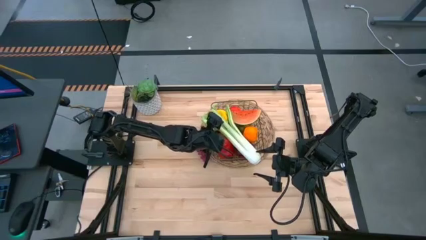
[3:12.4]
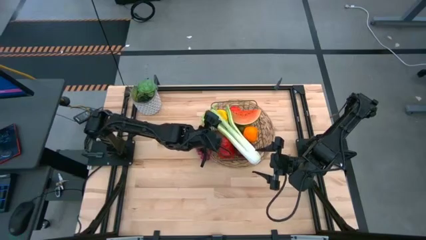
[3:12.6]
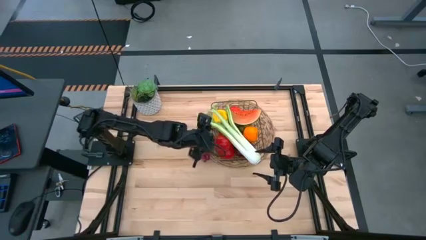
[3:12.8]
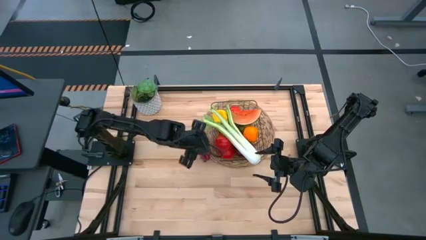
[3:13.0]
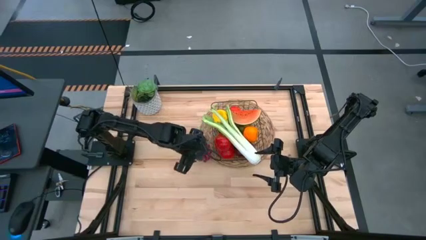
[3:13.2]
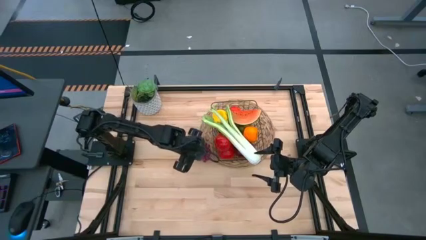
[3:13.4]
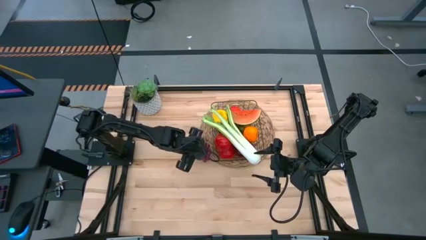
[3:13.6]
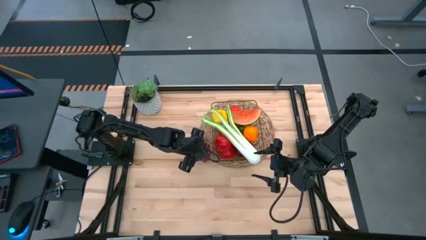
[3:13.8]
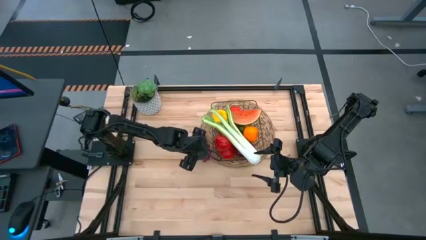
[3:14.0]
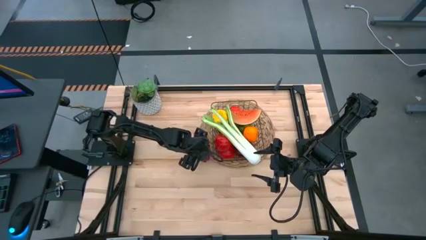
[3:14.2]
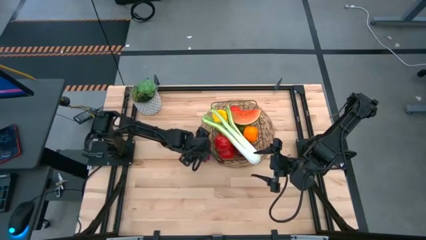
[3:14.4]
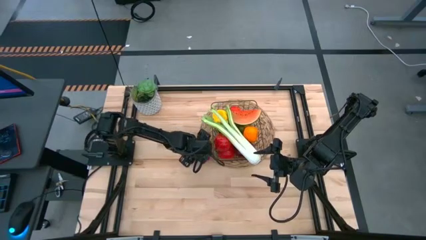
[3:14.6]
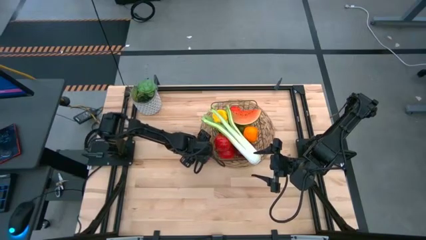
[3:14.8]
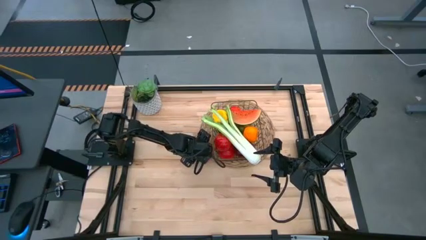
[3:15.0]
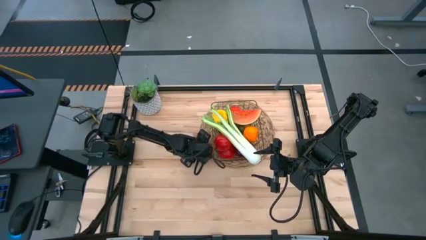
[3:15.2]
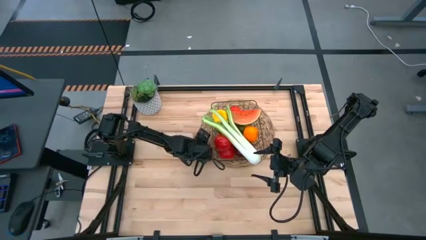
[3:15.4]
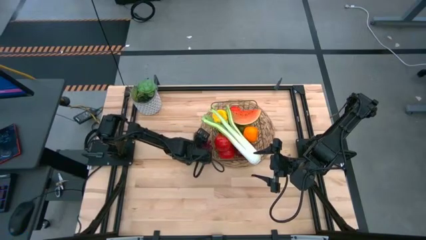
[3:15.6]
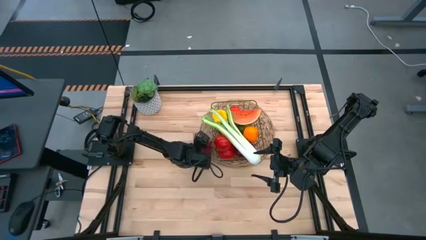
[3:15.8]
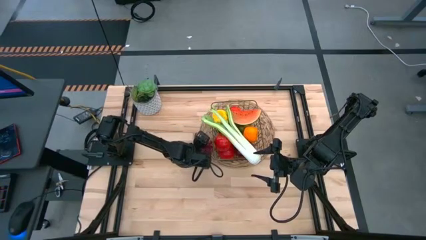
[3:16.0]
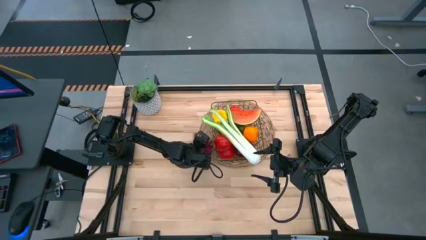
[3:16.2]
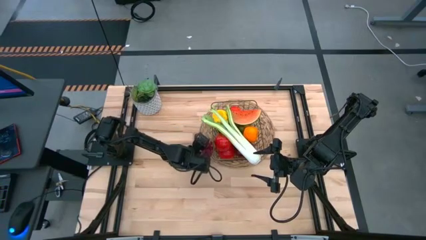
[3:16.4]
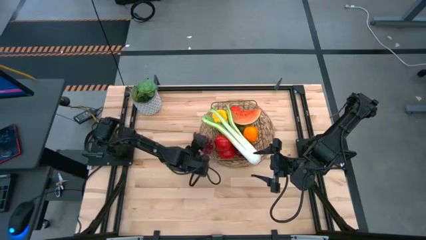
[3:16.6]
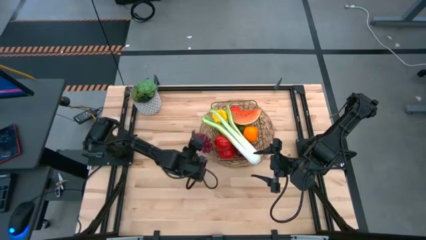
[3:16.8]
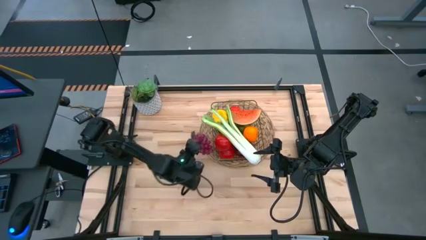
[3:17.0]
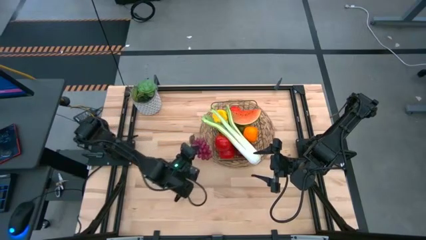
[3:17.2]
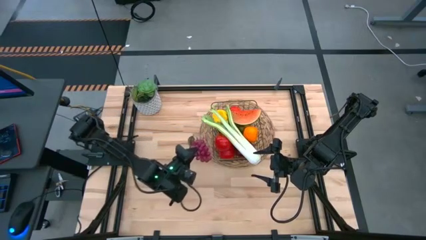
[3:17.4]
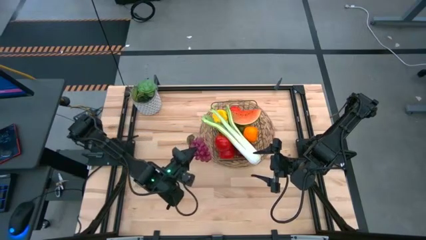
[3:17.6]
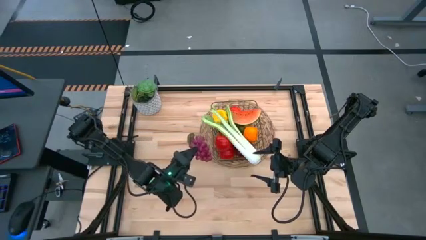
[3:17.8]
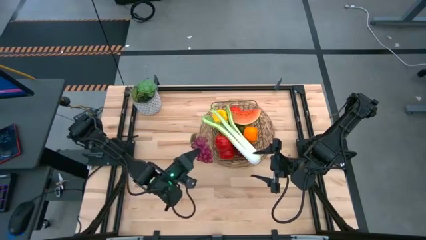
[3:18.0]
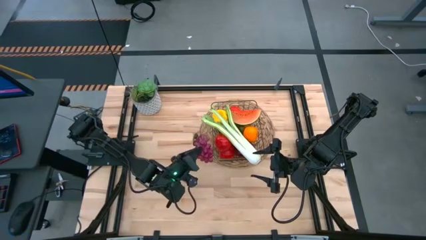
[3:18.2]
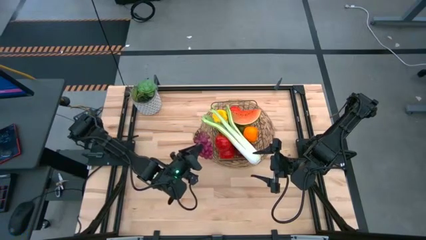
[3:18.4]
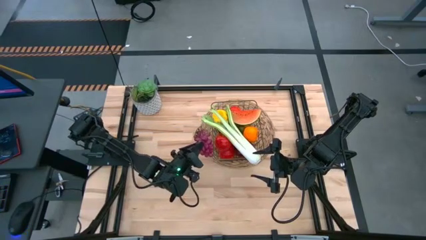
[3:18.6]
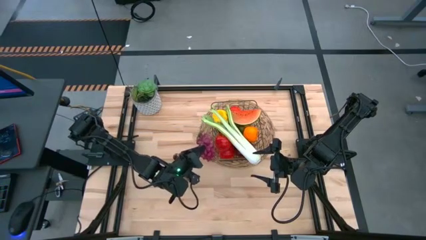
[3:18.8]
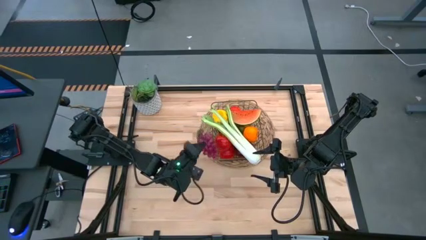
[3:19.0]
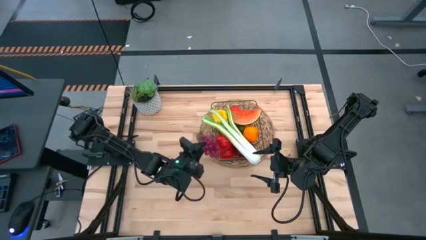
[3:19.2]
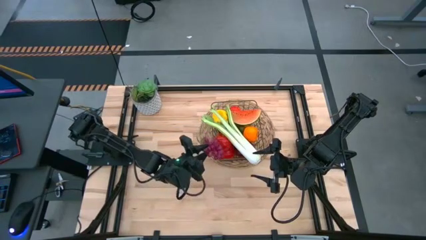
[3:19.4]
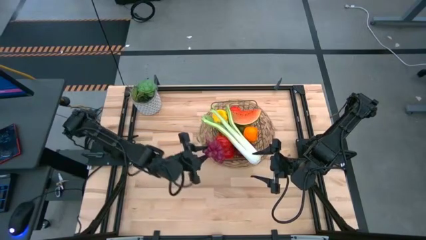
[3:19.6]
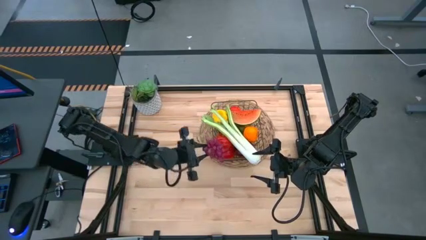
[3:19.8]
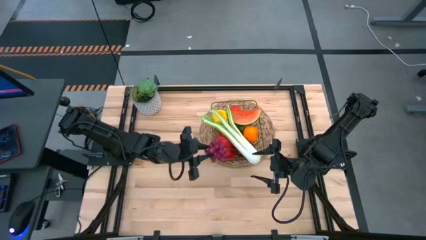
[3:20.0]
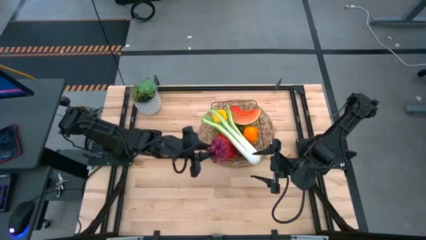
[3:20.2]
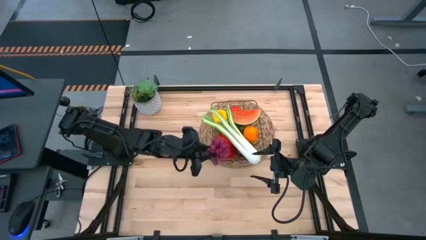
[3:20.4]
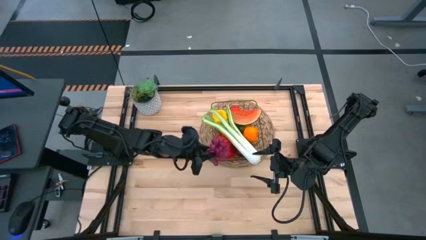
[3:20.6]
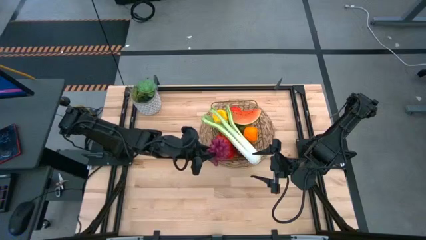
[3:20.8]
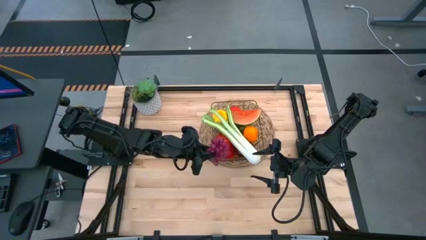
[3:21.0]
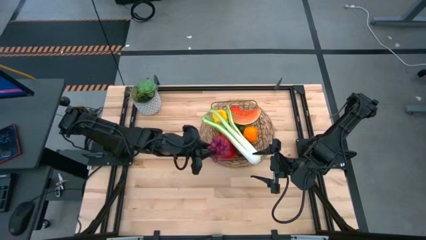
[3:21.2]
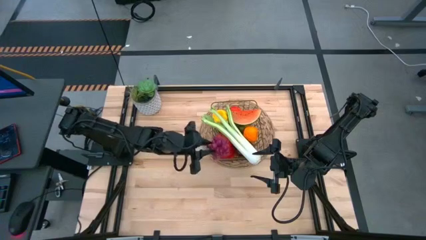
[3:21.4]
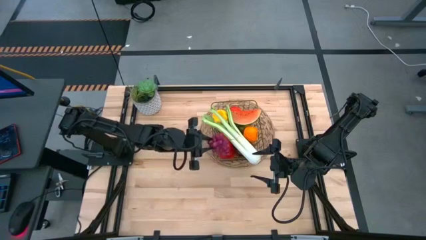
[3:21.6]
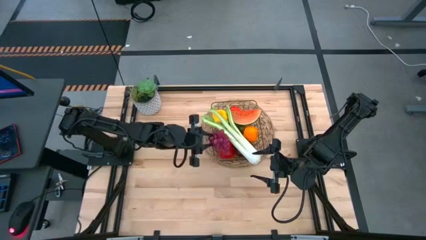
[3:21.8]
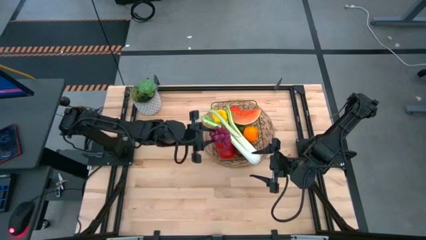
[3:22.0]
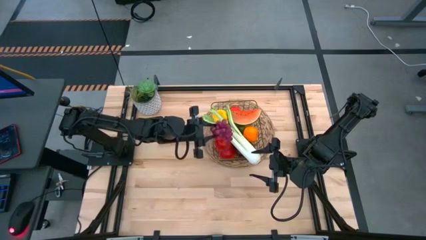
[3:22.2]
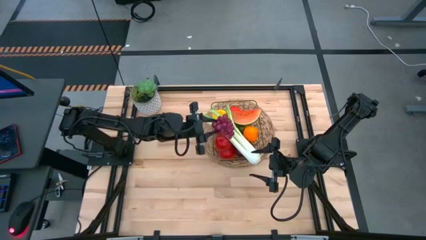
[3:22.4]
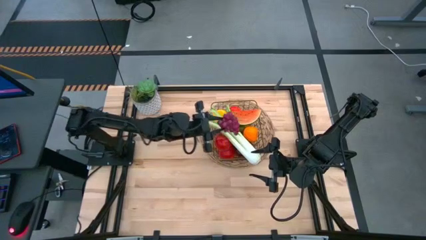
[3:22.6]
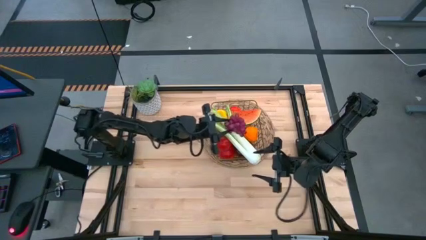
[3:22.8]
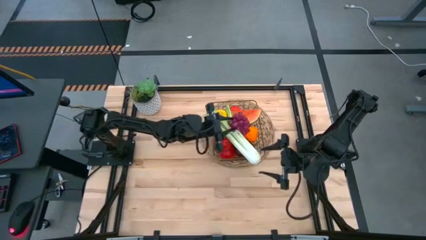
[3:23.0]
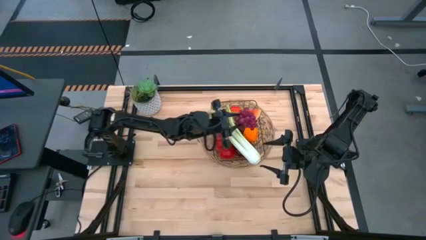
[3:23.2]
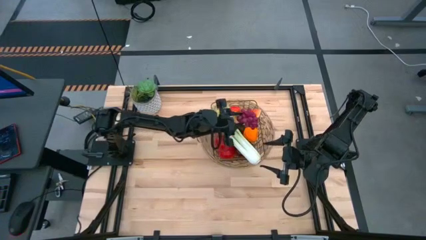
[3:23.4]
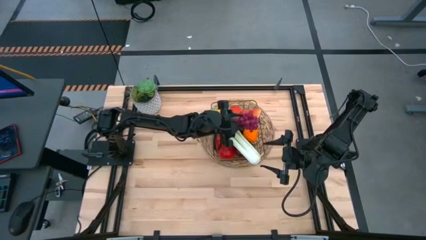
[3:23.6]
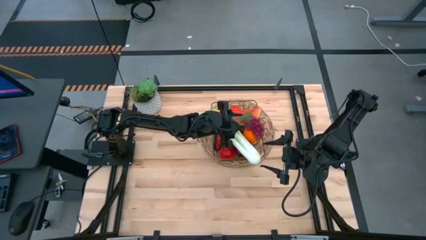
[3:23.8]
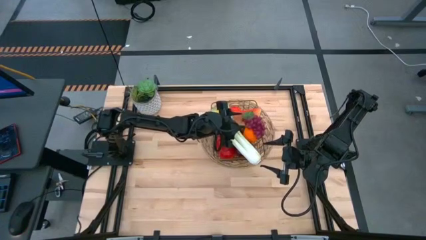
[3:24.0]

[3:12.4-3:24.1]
Task: Build produce basket
Put the grapes into the wire basket

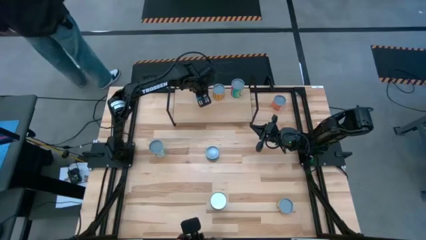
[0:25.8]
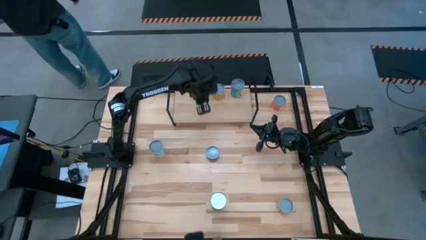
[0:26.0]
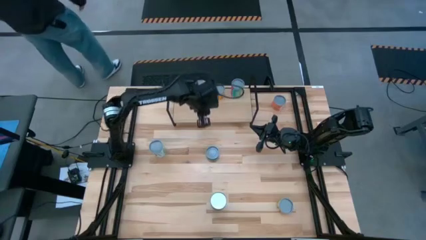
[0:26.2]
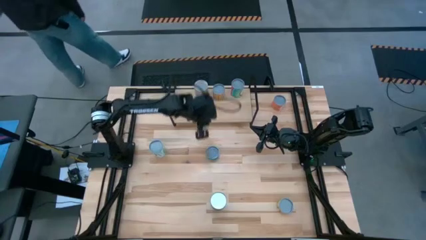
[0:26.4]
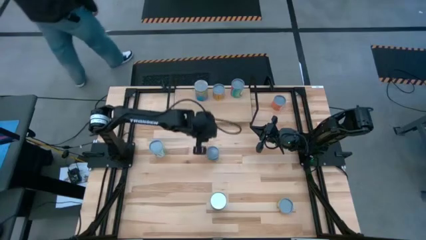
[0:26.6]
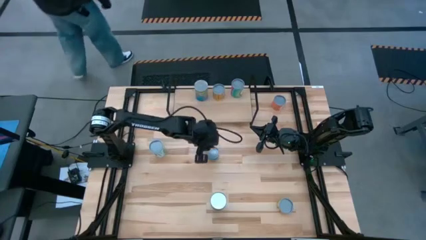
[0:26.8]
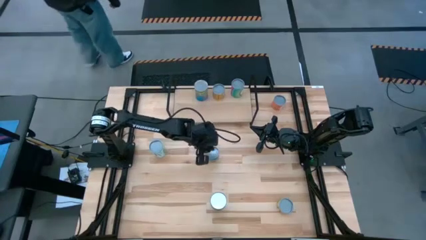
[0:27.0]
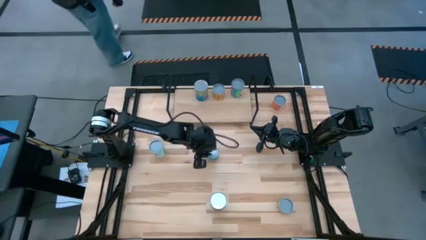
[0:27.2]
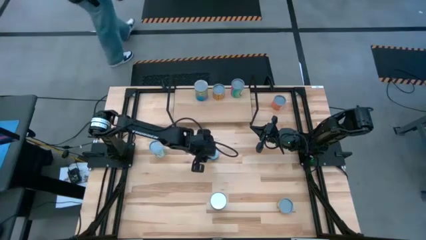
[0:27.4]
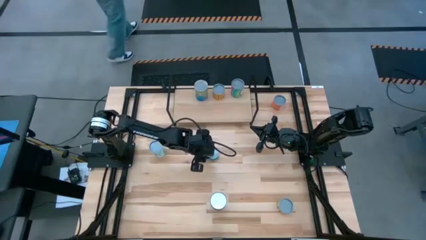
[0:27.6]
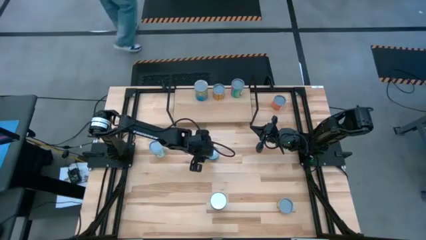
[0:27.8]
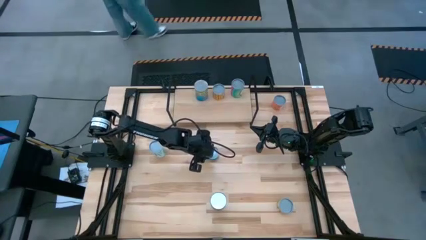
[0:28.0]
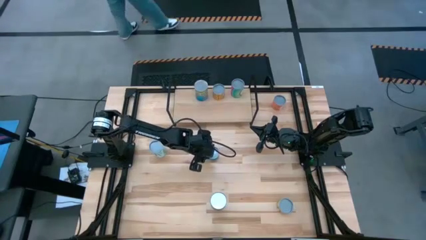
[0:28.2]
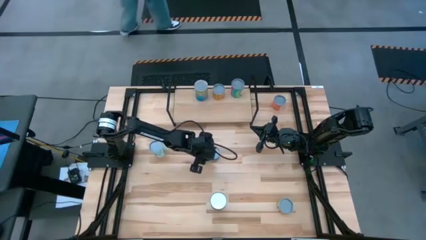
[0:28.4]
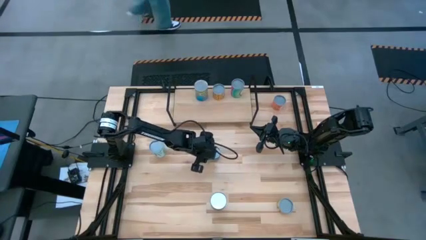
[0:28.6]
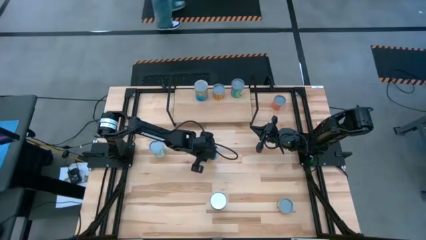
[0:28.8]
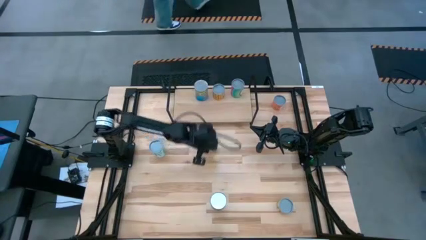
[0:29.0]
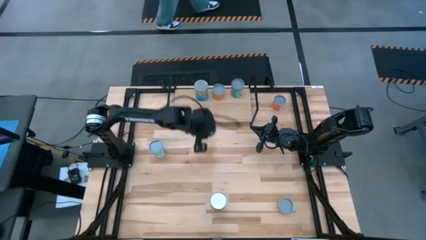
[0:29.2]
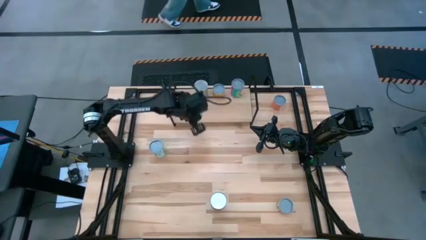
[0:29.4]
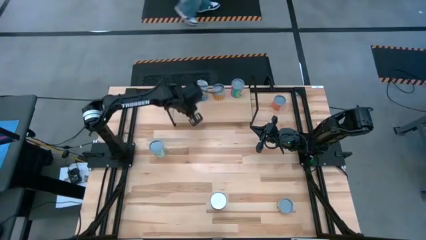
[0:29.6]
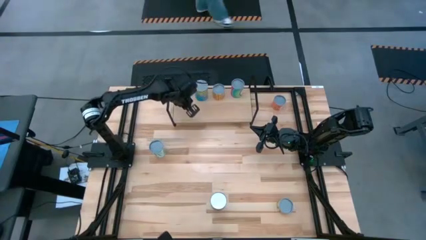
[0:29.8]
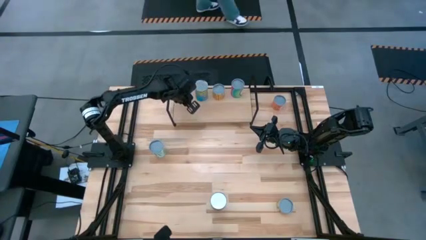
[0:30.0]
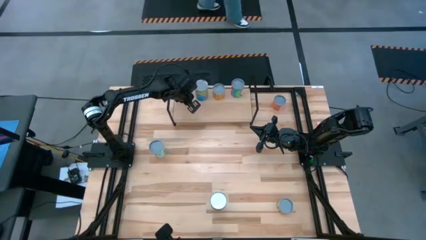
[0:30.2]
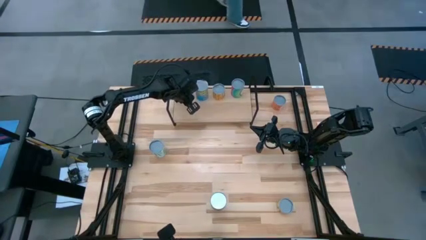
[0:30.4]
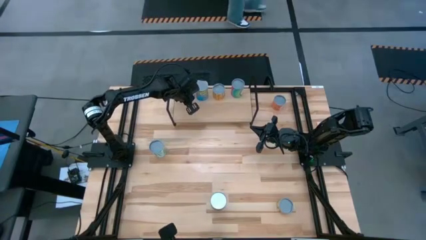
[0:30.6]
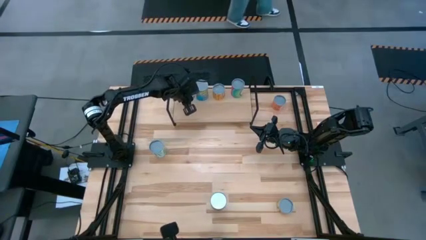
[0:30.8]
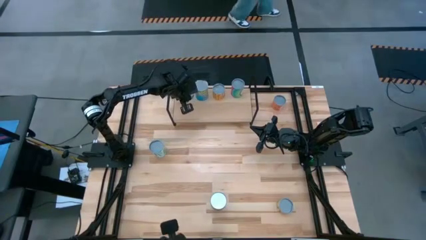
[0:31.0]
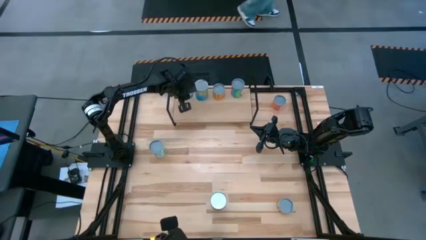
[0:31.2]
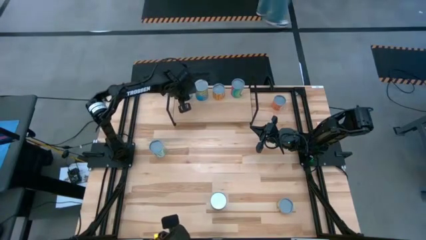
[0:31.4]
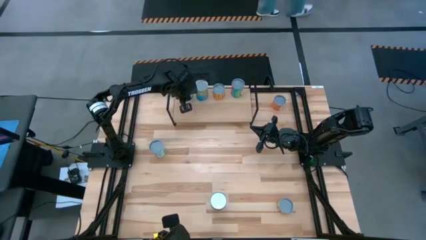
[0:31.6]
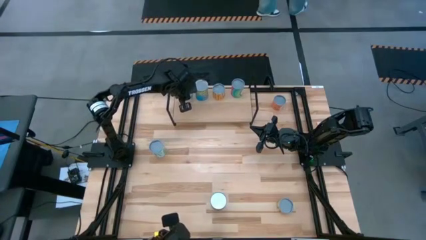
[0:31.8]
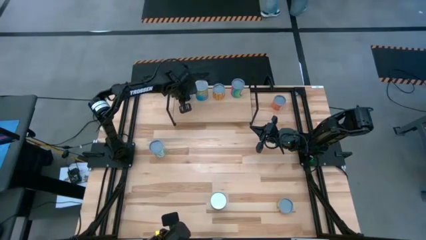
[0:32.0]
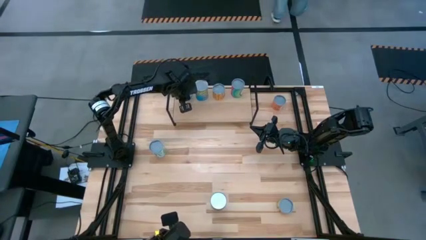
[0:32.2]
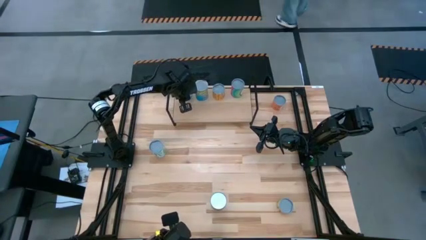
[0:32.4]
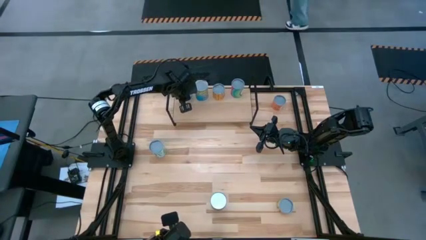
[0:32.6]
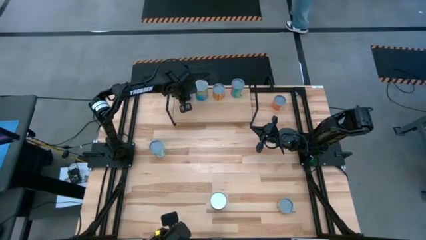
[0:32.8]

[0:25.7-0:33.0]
Task: Pick and place cans onto a shelf
Put the canned tuna on the shelf
